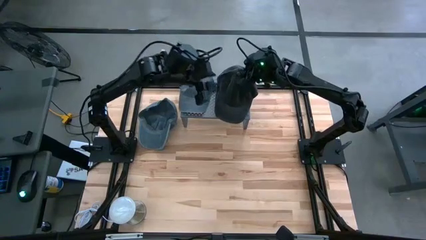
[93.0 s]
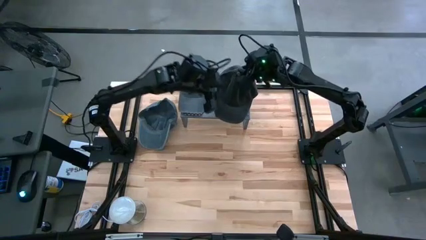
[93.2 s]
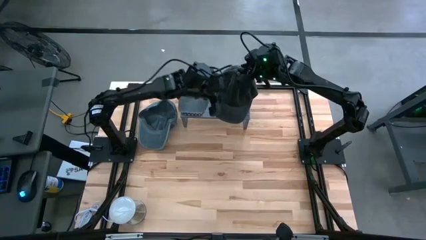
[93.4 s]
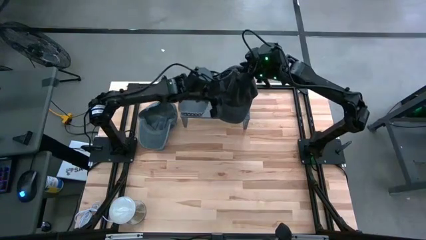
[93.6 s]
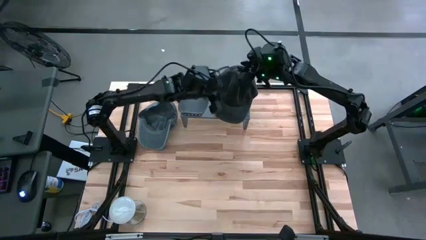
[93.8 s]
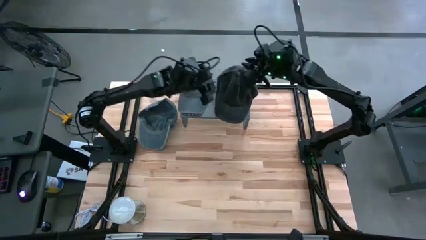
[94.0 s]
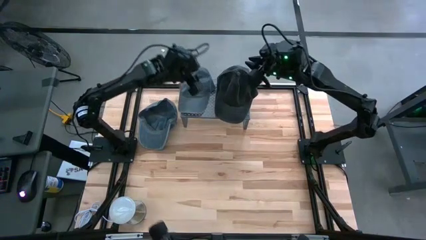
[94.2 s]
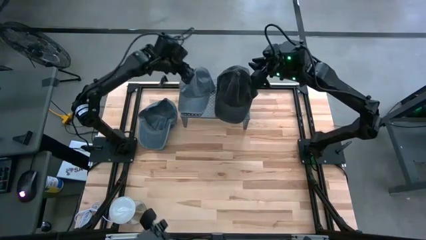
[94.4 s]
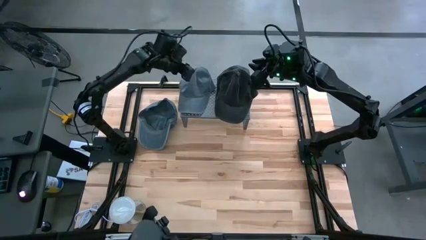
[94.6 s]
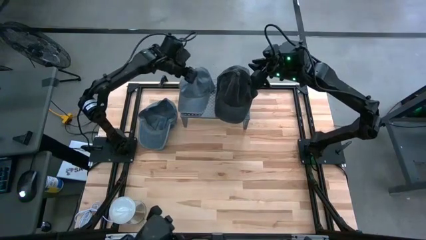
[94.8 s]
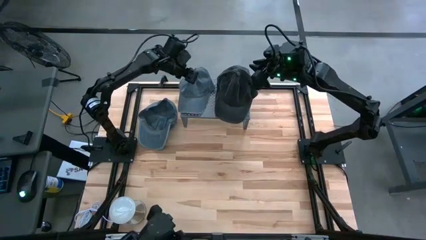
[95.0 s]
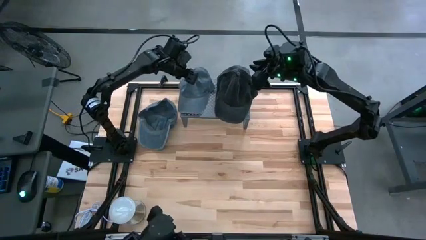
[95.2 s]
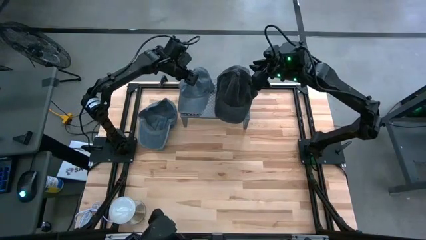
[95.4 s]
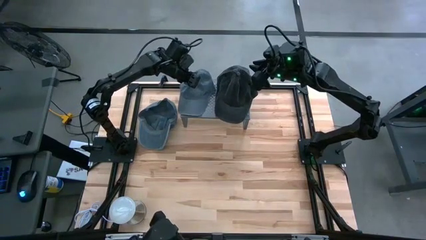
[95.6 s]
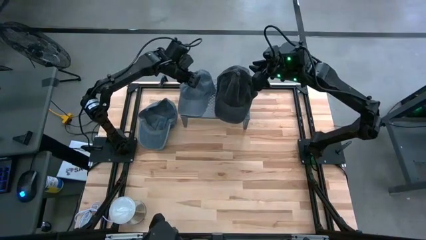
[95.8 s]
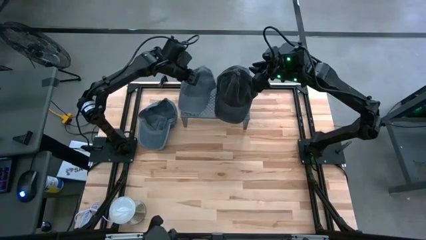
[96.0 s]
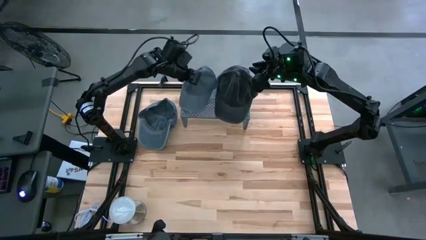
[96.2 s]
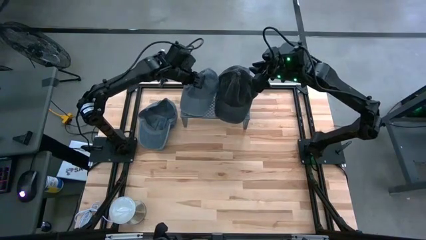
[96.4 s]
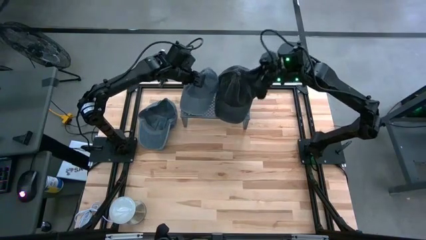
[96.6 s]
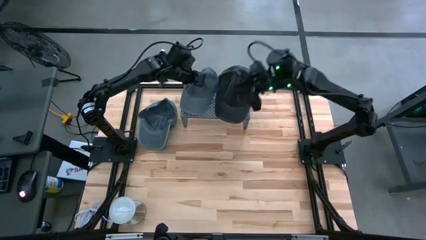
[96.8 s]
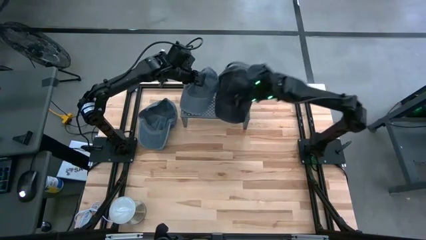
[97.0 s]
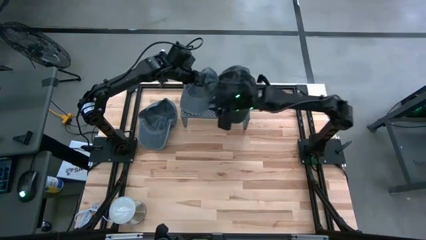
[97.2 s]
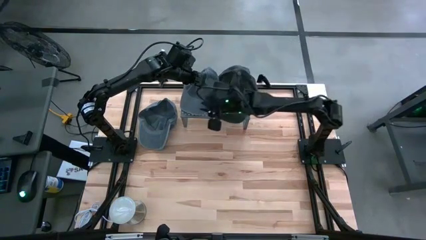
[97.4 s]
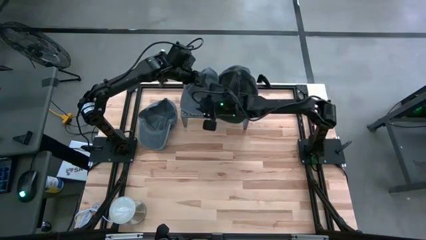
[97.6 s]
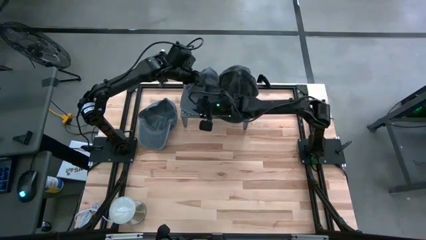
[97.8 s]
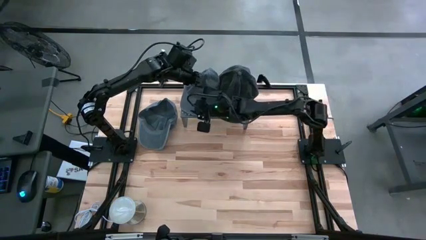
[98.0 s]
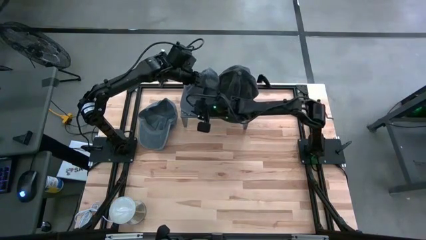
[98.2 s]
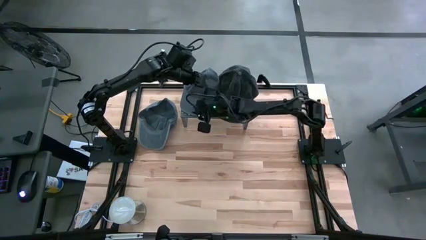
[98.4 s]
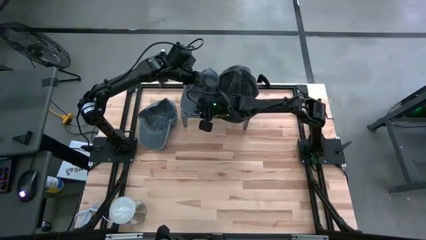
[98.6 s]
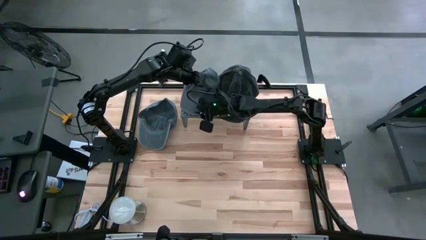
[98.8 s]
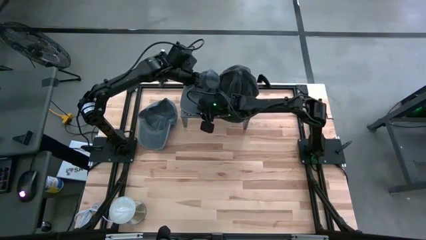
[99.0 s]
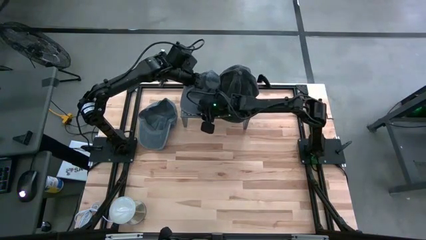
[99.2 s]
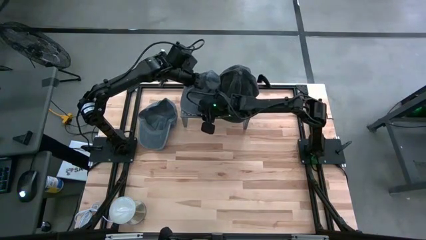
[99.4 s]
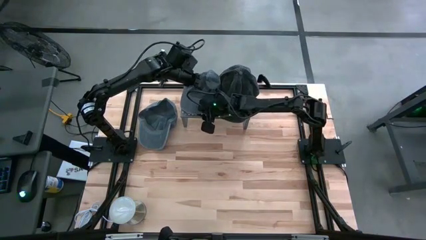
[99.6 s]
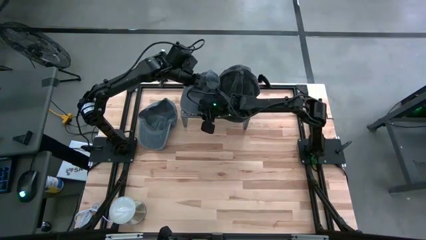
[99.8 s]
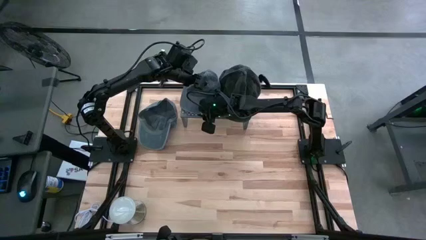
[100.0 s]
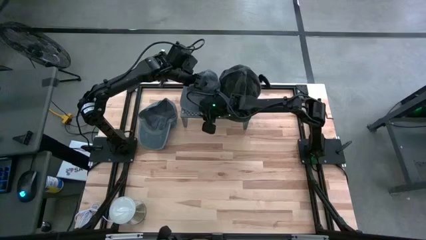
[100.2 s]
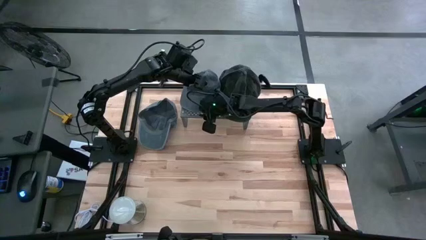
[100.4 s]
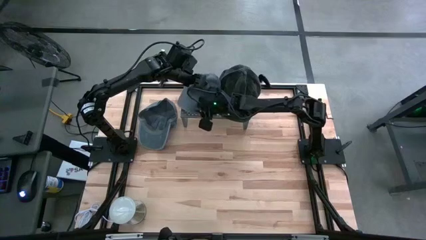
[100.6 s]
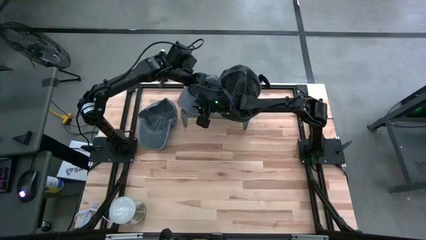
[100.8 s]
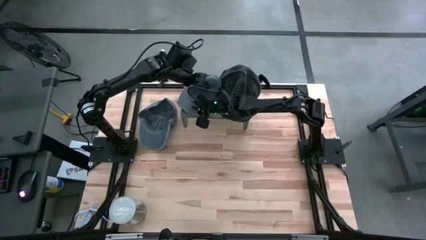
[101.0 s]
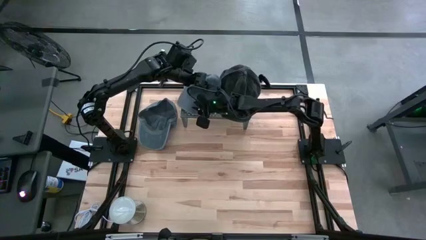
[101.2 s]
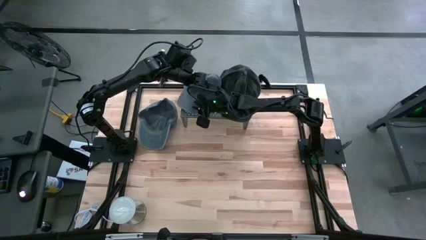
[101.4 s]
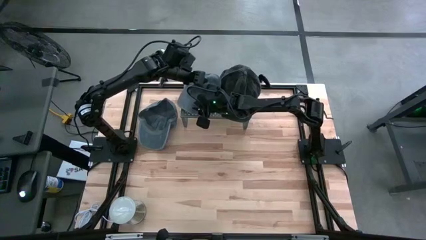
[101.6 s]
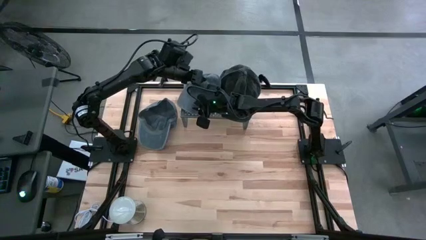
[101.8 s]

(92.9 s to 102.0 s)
Task: Pick & Place hat
Adjust the gray cap on the shelf

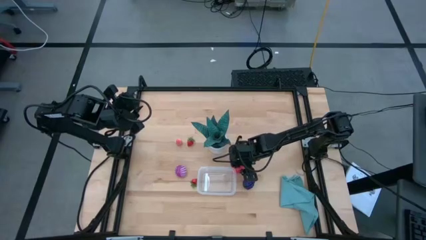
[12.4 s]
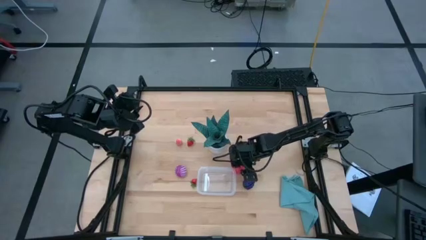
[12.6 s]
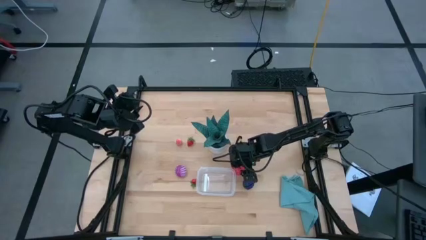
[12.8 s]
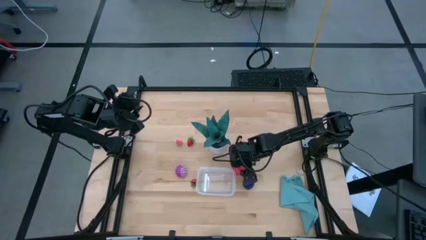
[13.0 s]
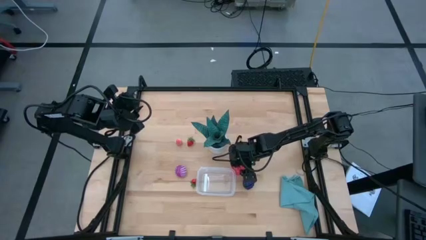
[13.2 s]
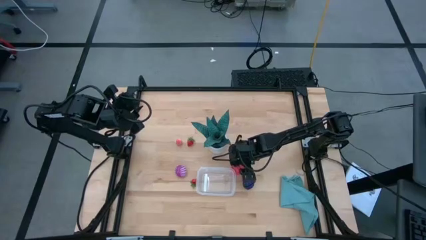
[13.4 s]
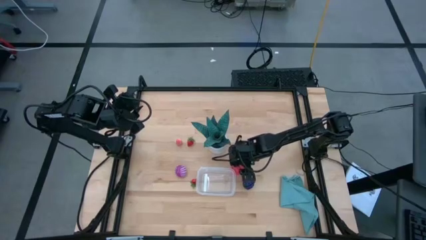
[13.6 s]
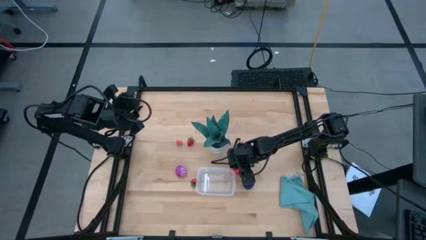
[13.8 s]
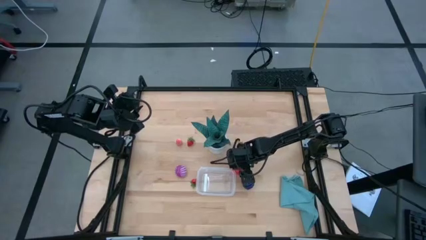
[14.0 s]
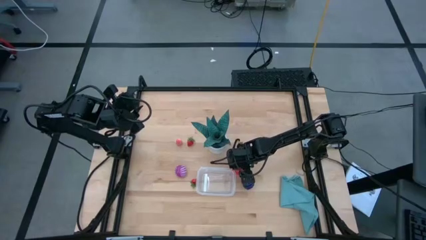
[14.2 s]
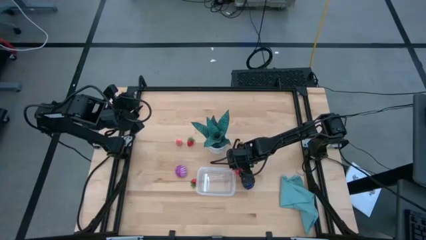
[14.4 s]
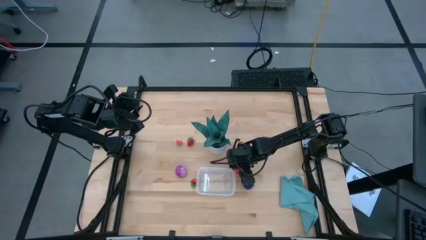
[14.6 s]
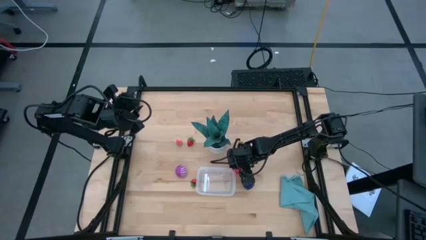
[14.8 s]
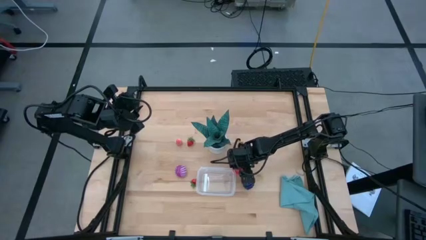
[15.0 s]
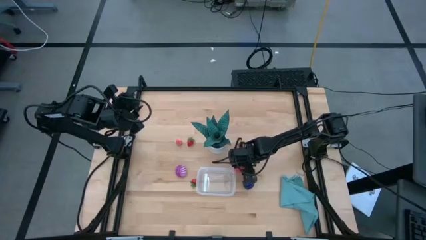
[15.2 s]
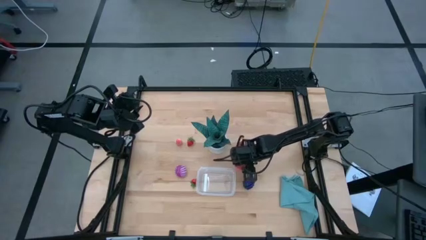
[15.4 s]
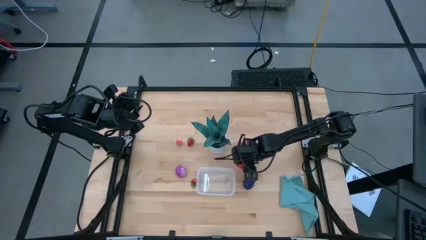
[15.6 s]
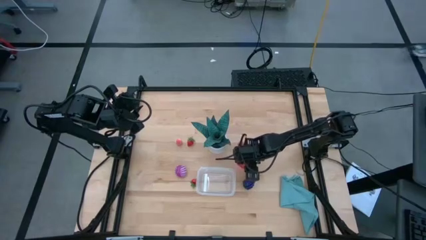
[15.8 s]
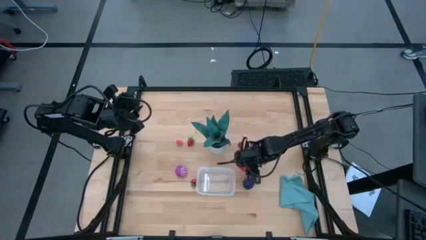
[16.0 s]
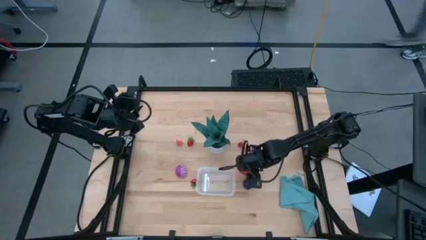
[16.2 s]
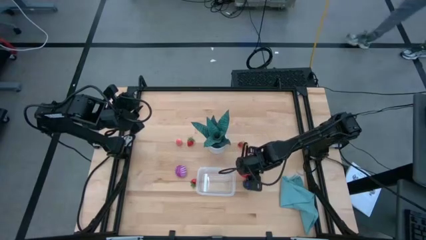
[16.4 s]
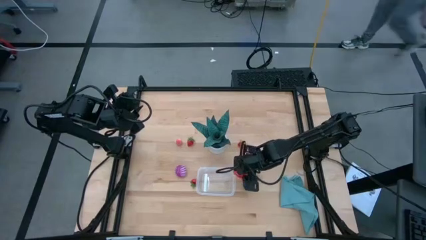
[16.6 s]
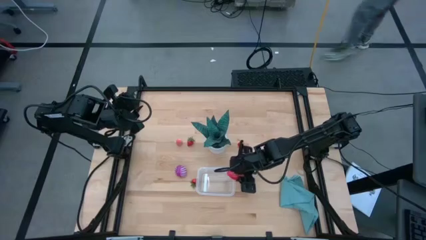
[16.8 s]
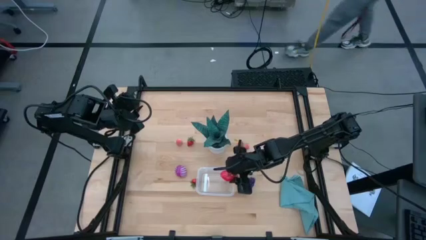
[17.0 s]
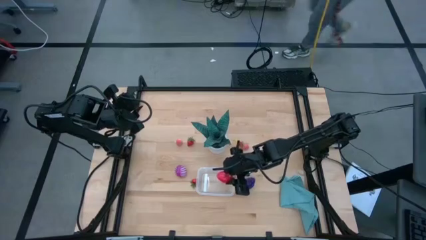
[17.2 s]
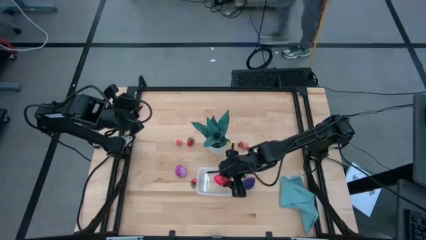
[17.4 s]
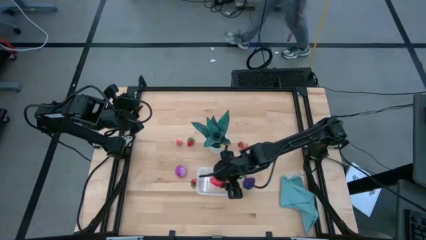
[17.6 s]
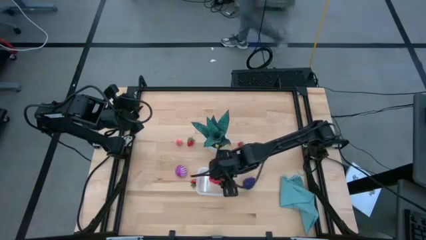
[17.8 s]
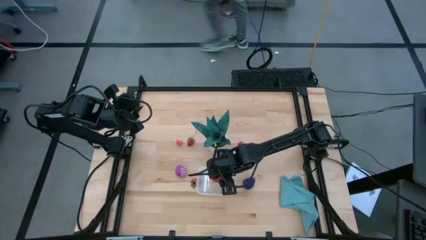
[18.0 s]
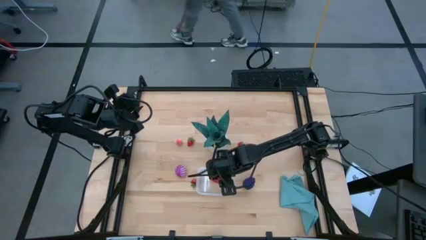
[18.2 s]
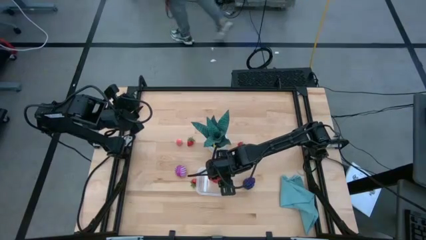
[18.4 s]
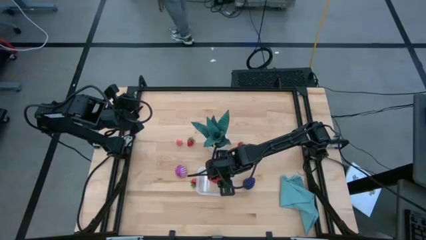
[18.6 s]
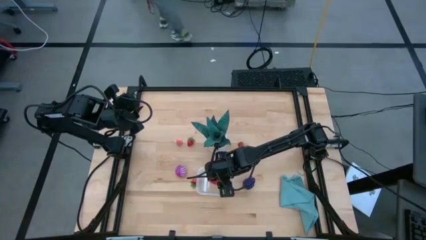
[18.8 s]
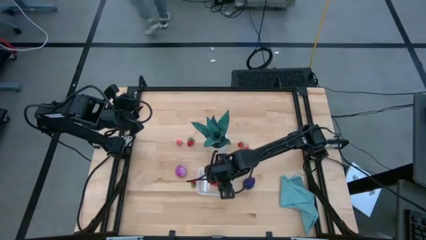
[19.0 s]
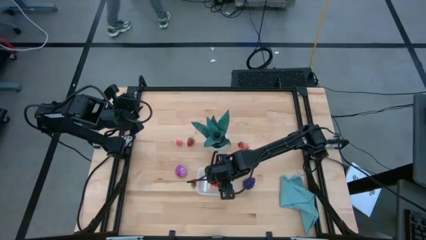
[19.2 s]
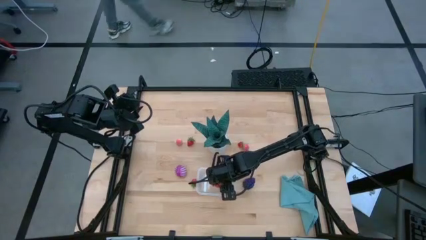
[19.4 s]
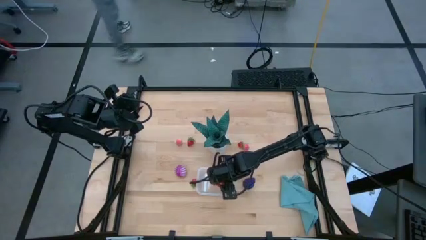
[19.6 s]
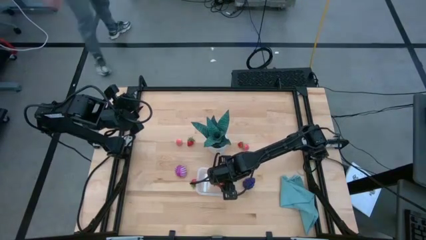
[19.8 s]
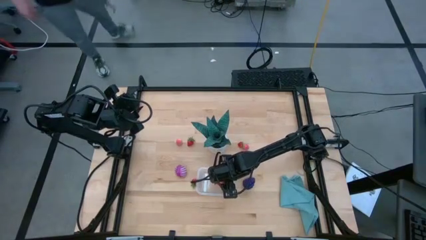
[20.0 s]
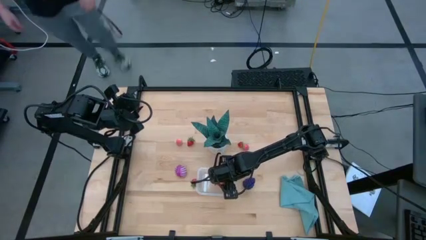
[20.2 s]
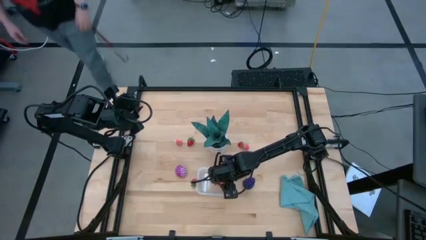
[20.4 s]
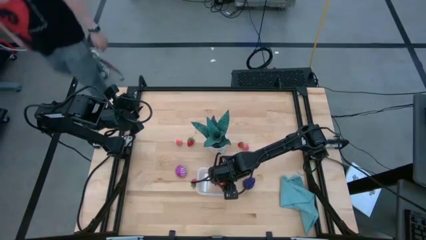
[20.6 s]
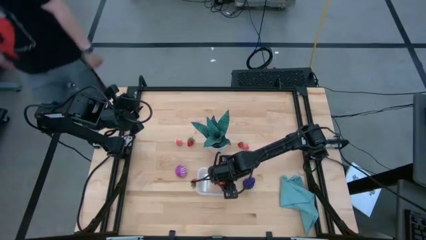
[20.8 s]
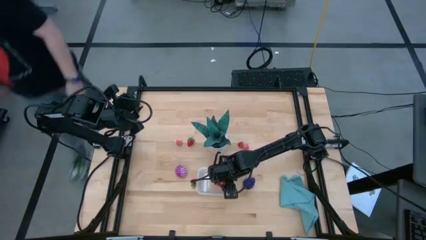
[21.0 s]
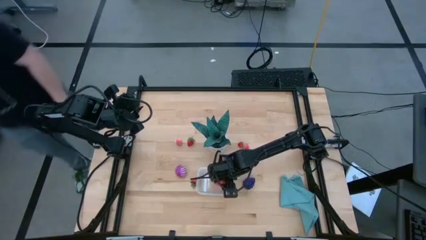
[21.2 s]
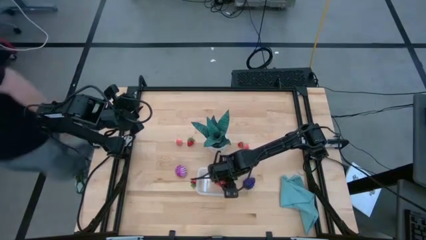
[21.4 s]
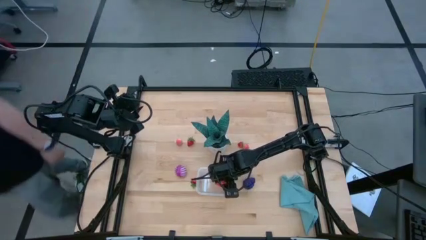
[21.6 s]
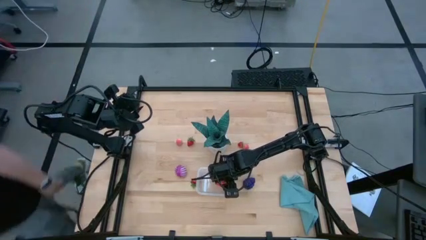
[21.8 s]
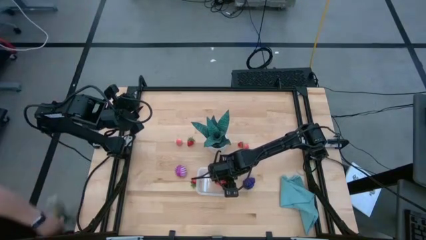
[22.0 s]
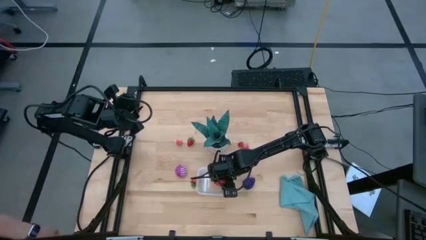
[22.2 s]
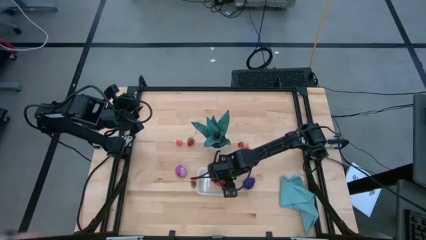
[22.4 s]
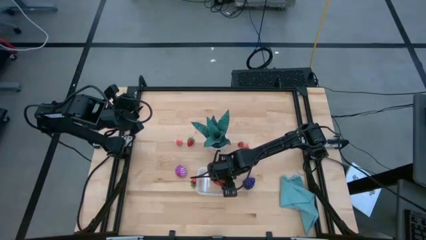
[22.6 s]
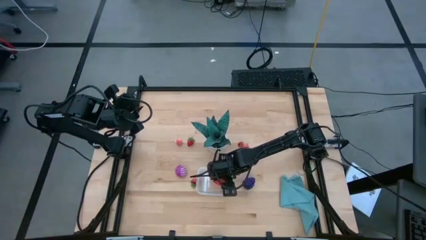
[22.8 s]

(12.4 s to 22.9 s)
Task: Pick and placing Produce into tupperware
Put the red dragon fruit into the transparent bin
